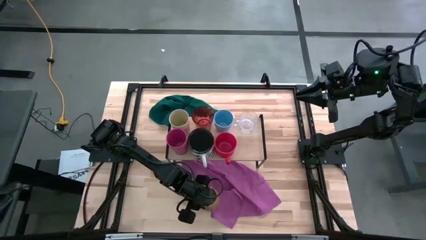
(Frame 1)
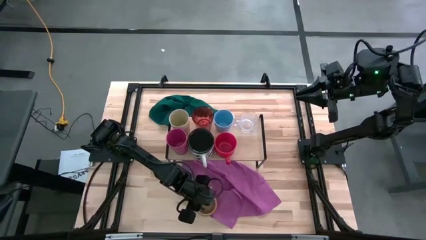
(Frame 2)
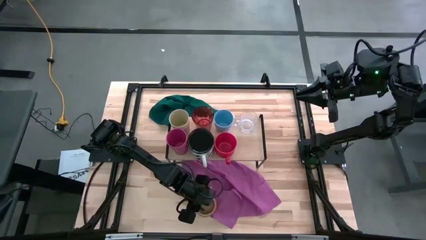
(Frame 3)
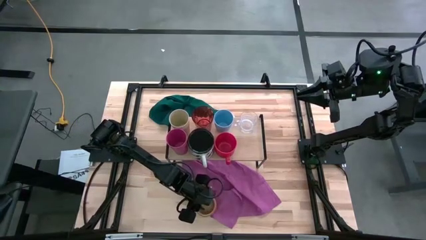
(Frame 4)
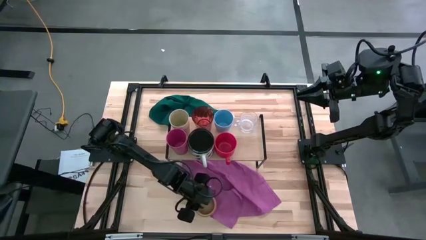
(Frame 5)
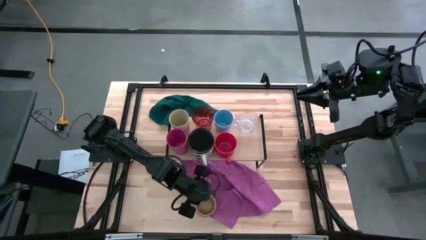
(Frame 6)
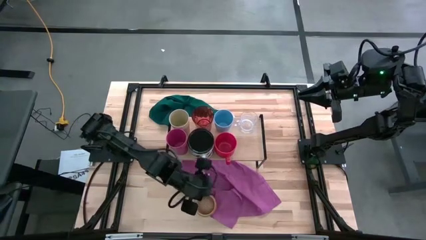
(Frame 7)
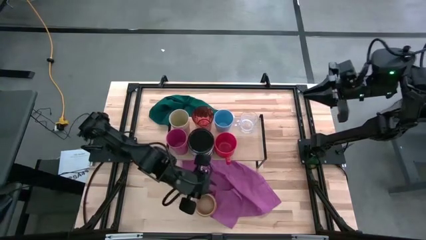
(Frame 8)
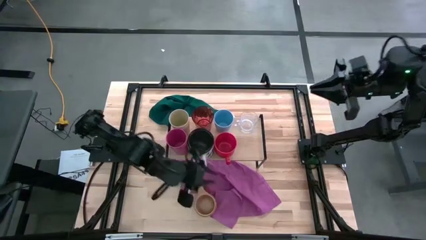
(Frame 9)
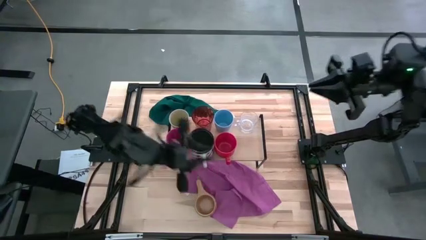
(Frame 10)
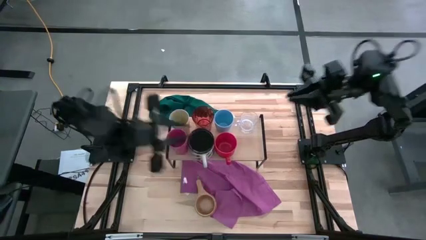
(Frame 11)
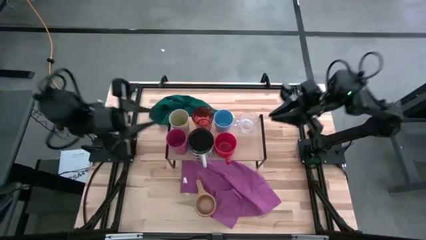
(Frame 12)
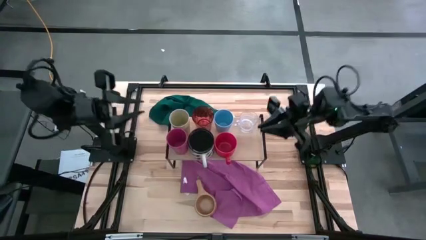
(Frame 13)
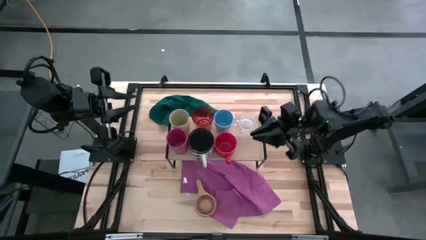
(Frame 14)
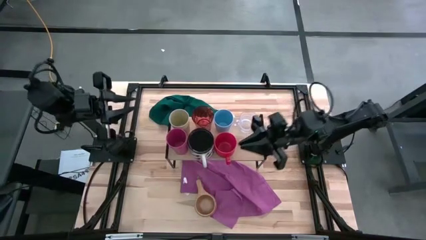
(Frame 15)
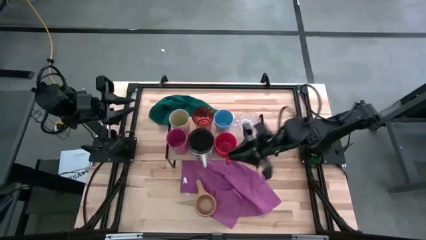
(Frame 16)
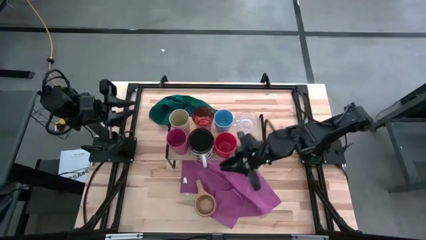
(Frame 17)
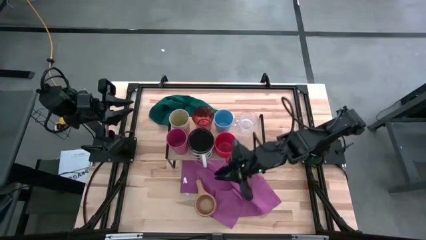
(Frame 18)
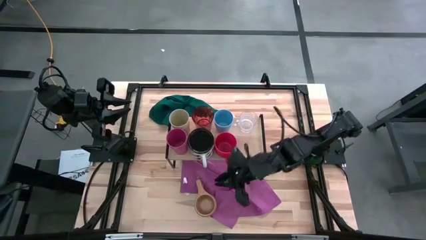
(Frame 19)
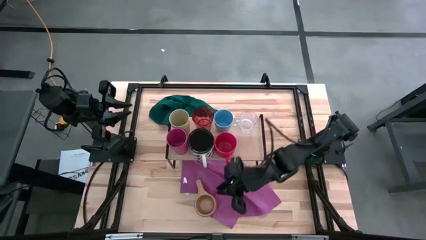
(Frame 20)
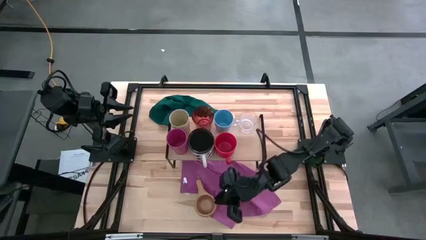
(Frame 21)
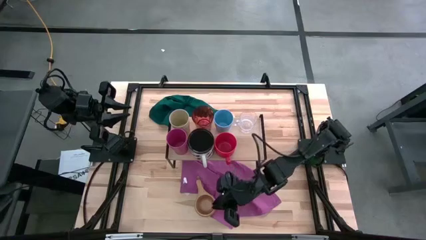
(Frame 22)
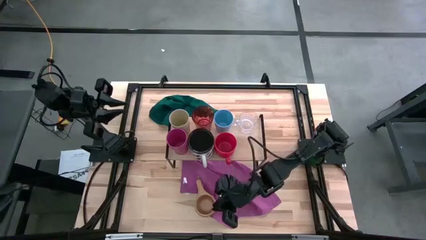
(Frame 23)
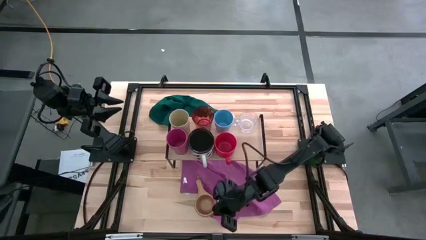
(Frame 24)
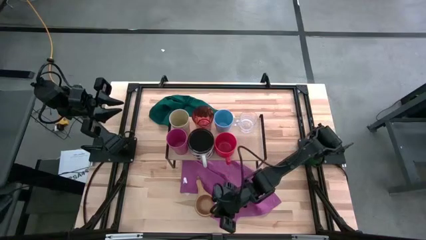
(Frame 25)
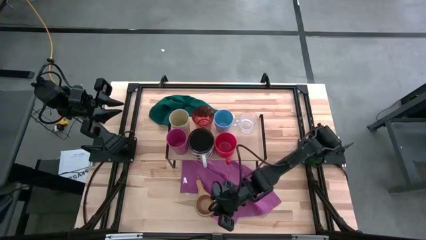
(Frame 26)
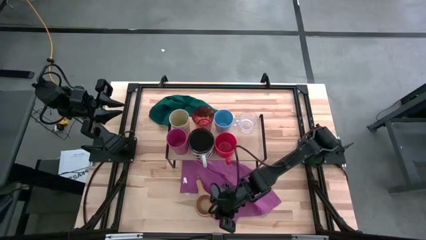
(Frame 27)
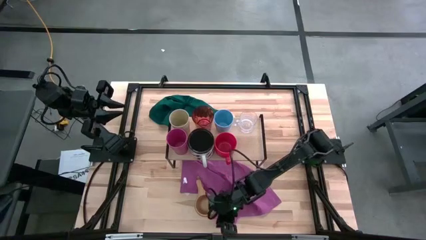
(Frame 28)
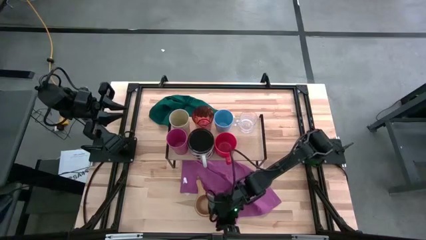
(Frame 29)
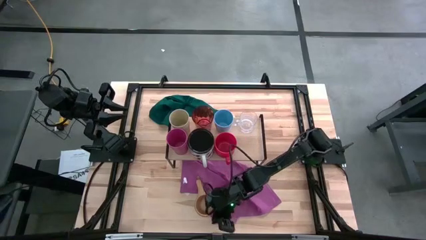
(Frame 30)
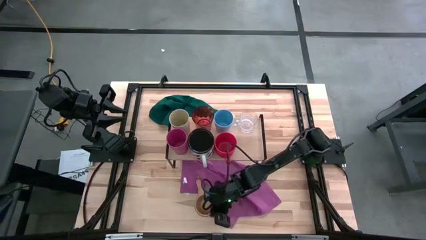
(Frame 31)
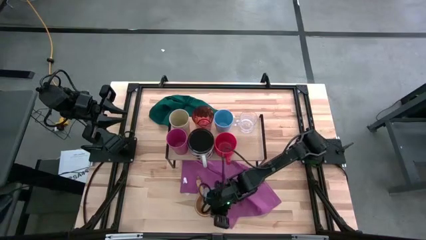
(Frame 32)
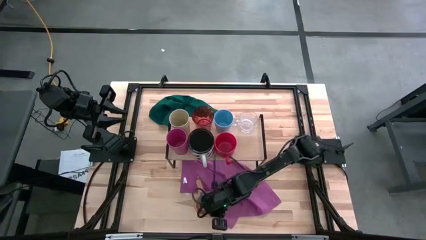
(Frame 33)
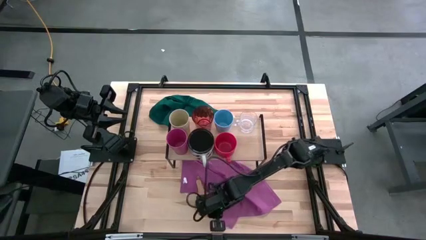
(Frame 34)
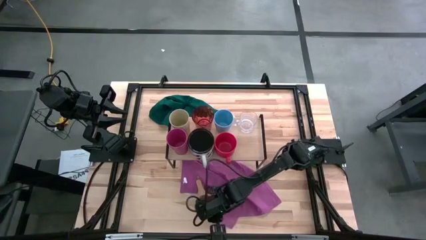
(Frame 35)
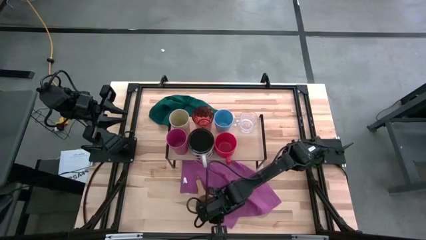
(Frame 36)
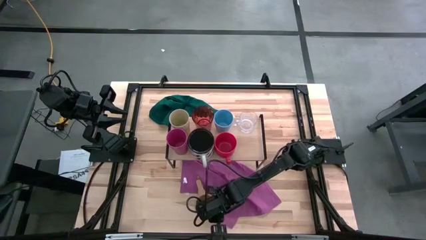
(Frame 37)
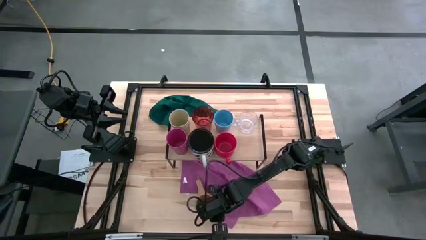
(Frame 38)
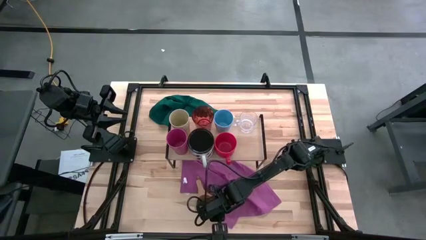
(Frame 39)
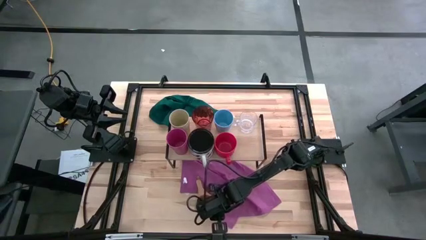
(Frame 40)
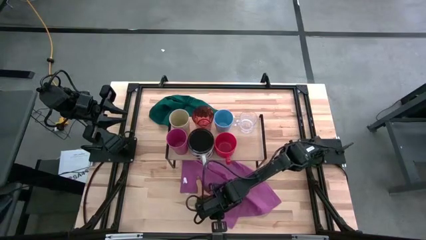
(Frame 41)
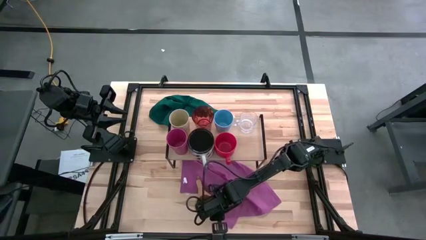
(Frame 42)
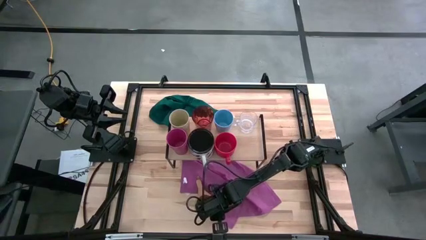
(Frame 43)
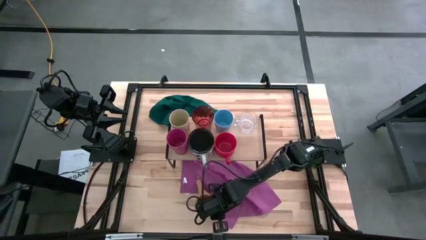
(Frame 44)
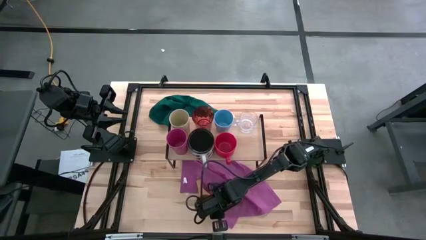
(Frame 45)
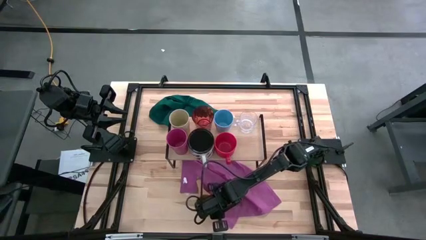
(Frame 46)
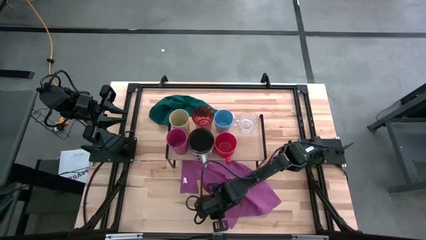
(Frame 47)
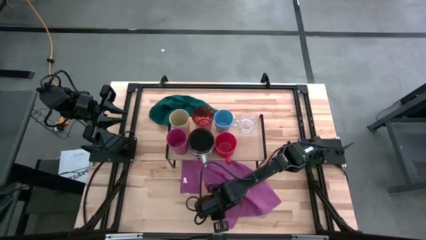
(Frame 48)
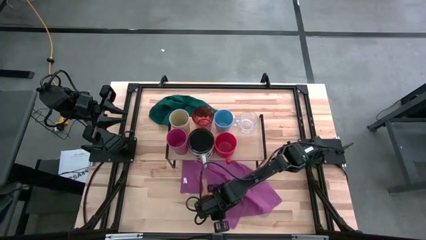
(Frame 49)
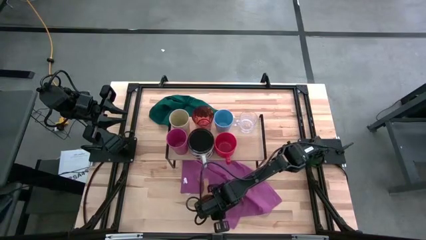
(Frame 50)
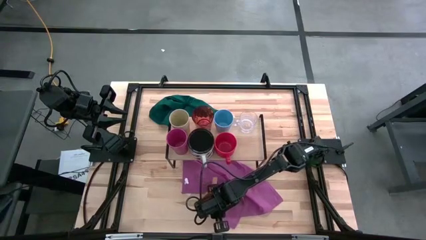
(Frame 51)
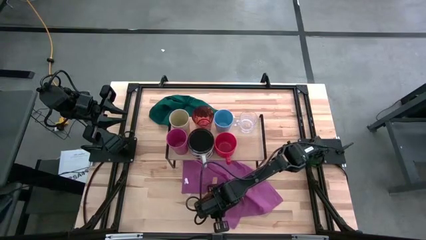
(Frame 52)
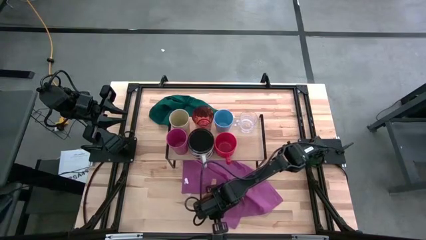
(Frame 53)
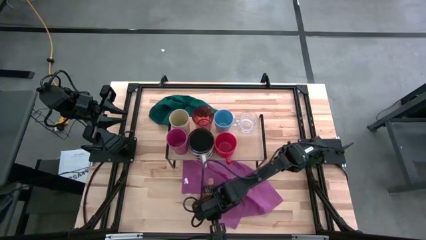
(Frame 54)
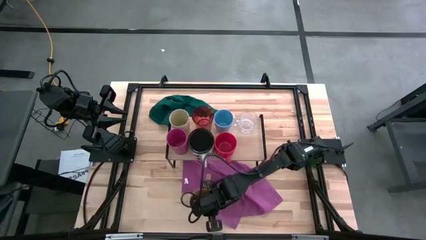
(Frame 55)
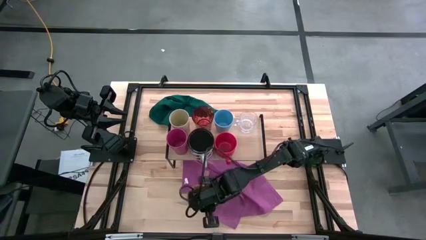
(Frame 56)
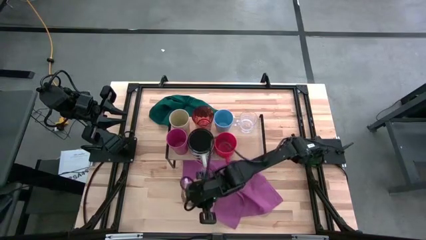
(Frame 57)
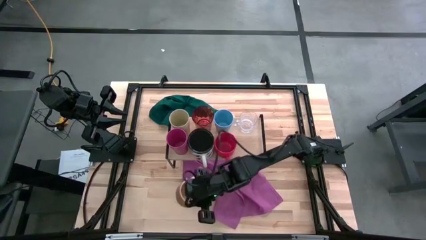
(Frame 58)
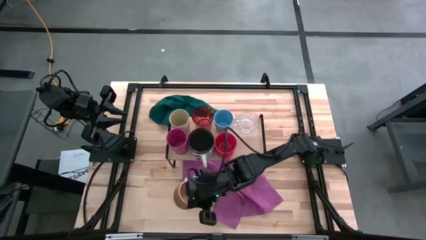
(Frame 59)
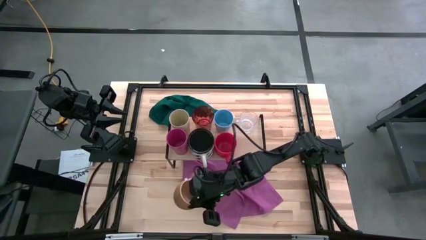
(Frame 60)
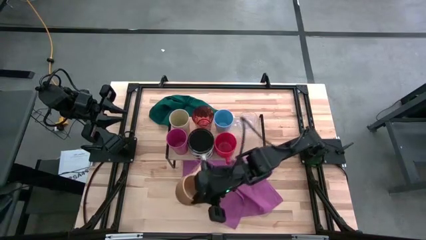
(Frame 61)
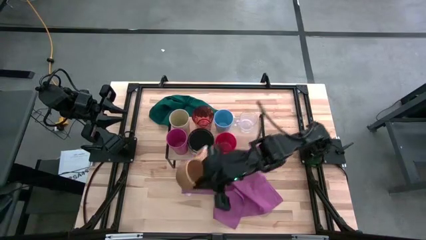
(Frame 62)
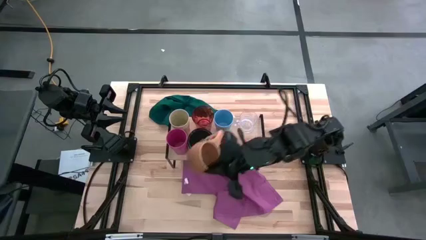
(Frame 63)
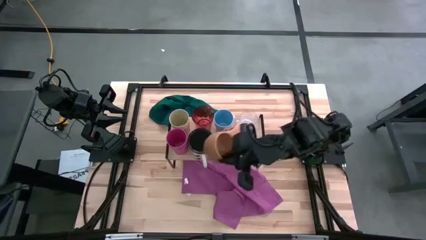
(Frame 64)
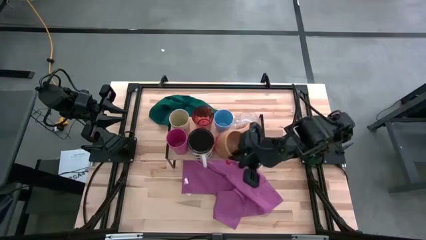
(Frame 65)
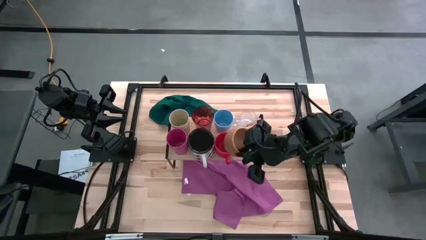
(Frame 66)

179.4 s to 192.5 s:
Task: Stack small to large cups/mugs on shelf
Put the brown mug on the shelf

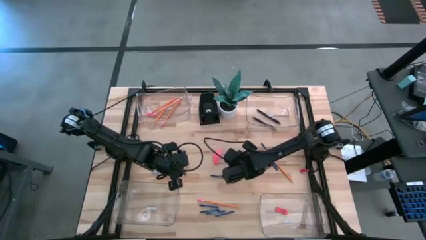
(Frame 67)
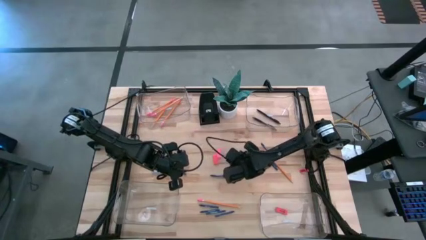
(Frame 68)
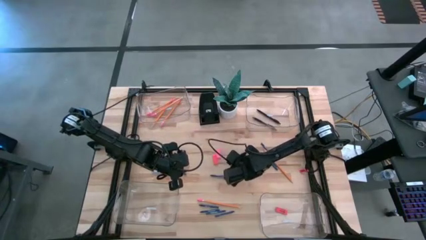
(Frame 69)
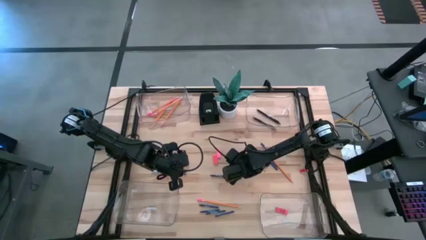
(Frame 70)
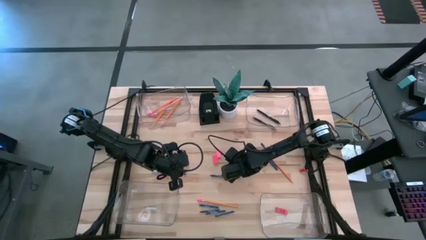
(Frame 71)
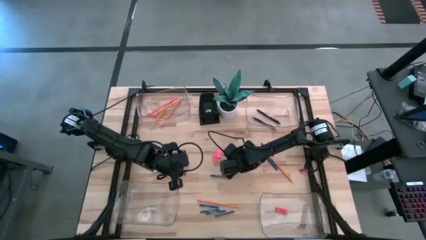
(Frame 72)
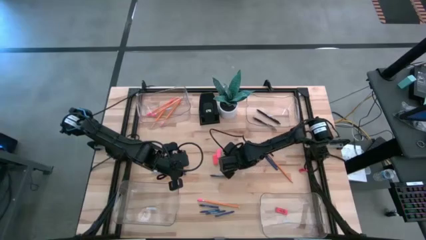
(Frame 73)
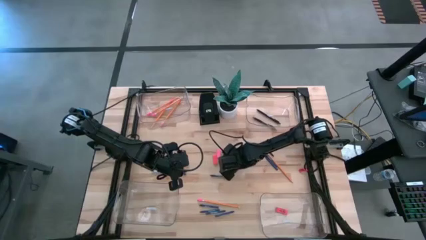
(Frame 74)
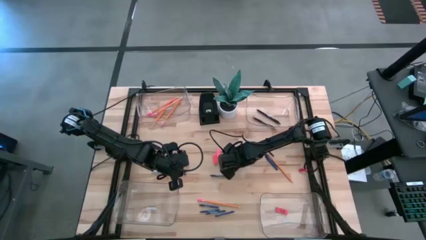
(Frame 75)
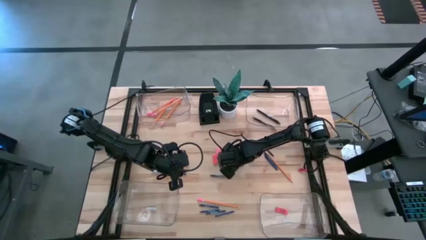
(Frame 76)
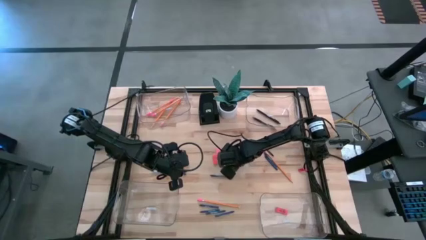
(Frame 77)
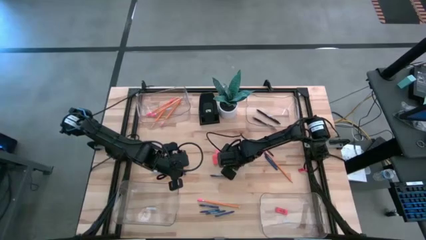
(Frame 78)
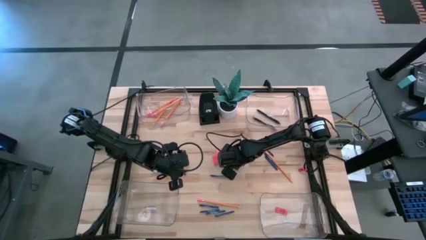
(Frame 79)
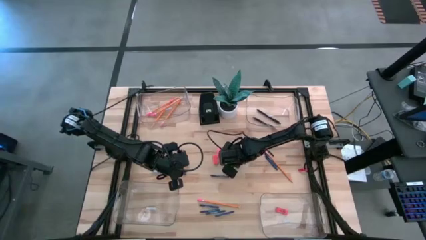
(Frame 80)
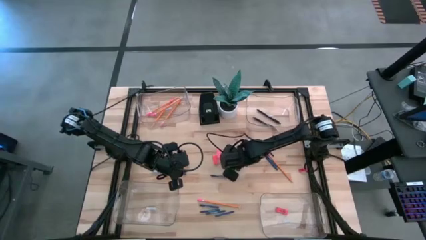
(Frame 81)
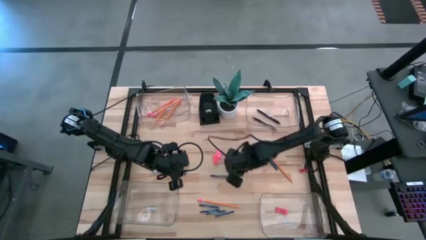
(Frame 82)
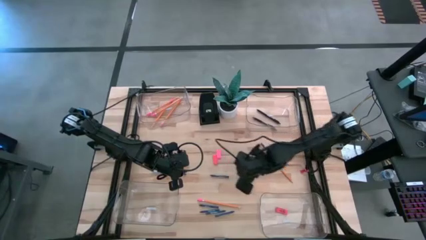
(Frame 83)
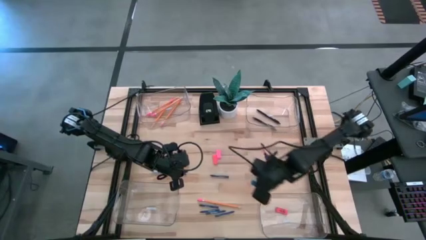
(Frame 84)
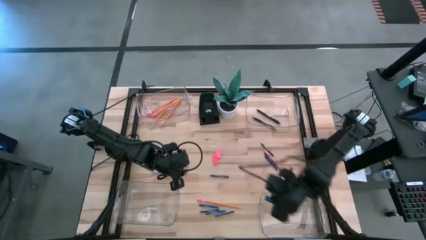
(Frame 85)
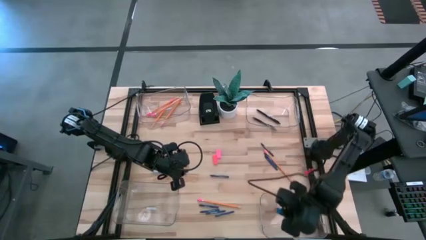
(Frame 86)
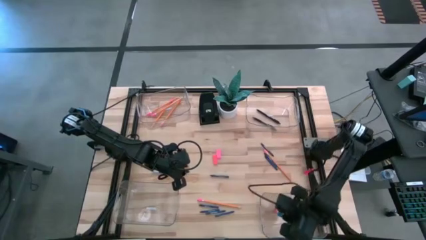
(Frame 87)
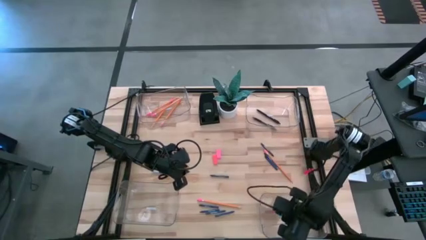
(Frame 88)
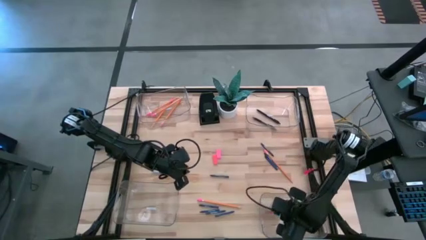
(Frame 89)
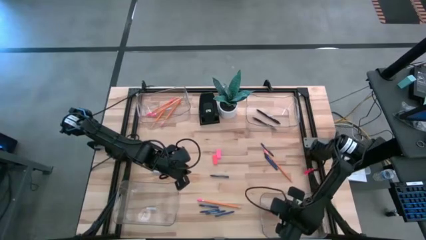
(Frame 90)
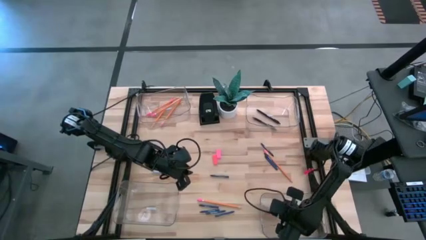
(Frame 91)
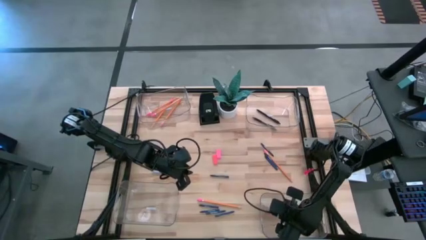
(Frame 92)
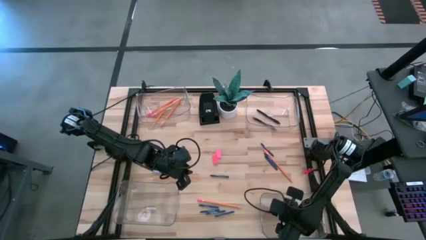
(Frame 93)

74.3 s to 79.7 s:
Task: Sort crayons/erasers/pens/pencils in bins
Put the blue eraser into the bottom right transparent bin
